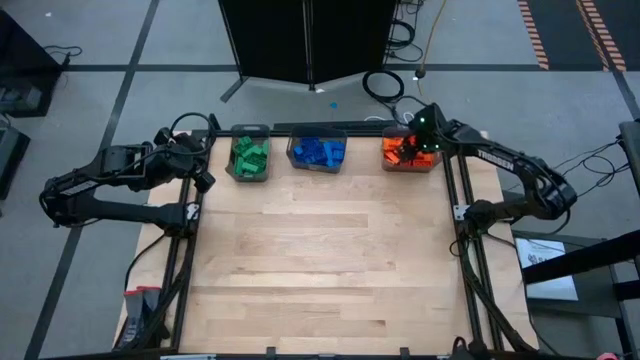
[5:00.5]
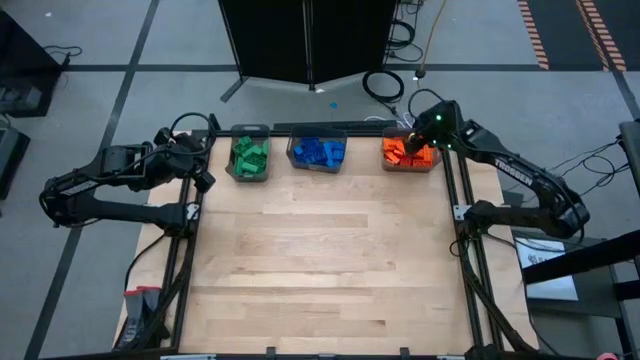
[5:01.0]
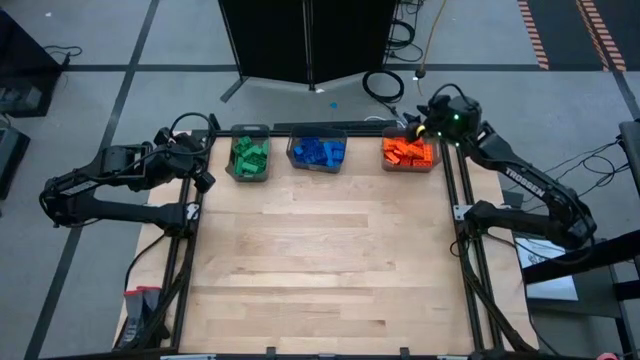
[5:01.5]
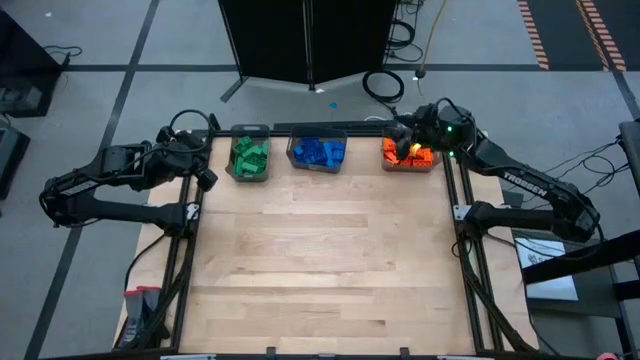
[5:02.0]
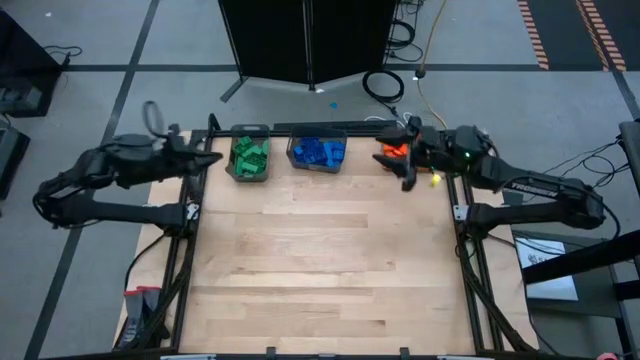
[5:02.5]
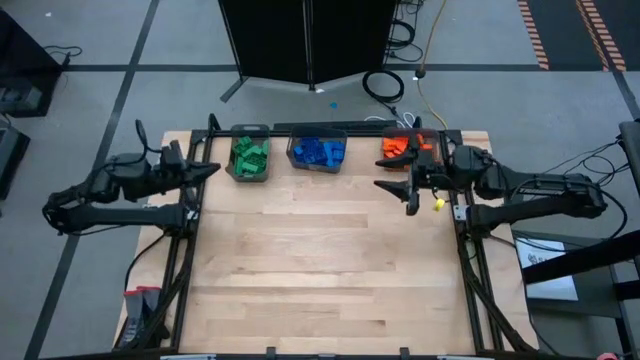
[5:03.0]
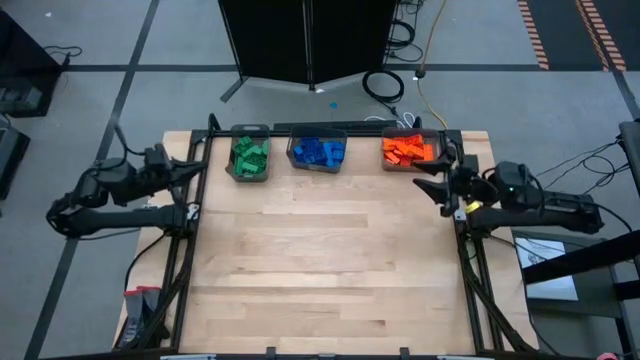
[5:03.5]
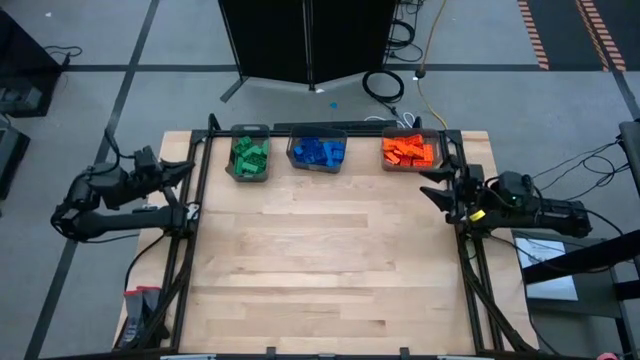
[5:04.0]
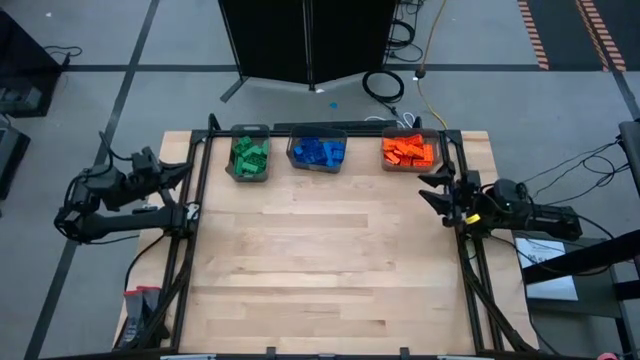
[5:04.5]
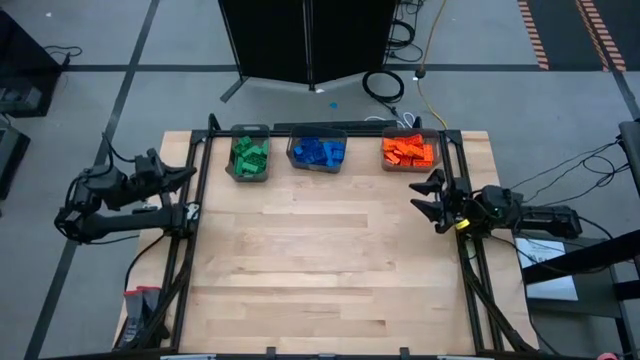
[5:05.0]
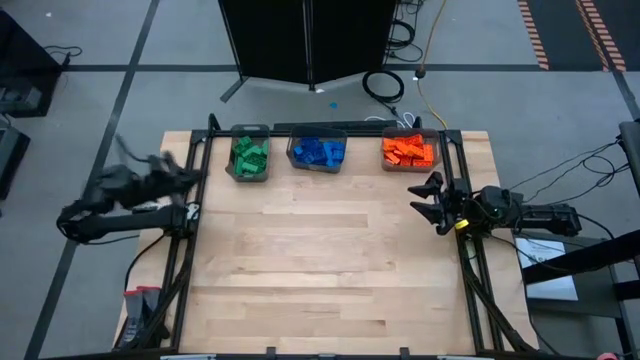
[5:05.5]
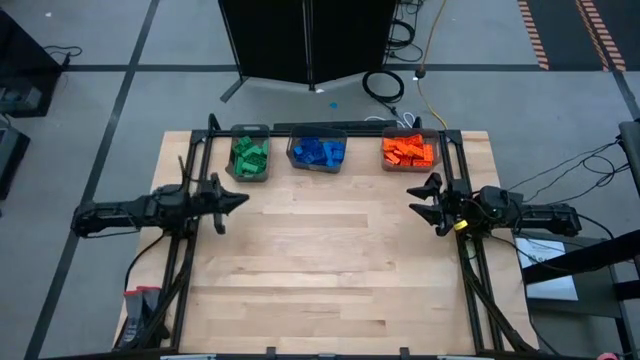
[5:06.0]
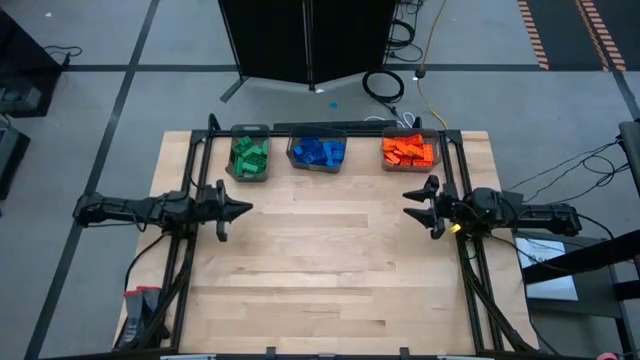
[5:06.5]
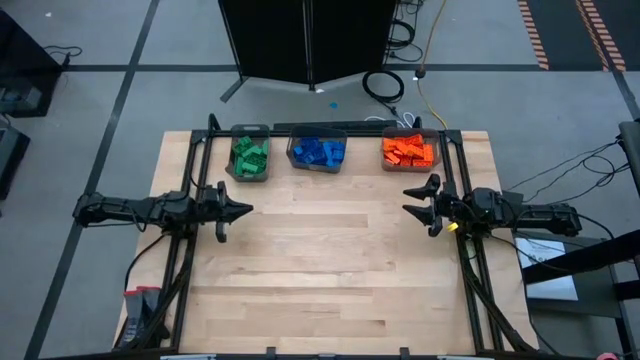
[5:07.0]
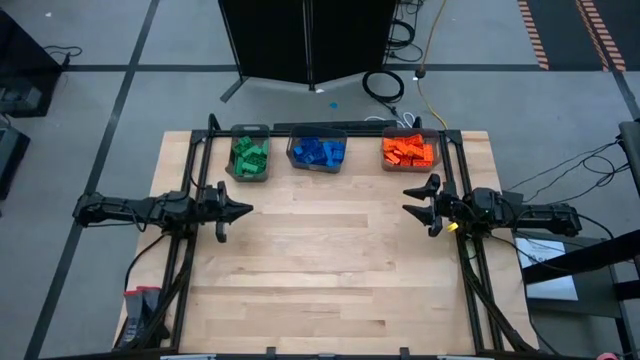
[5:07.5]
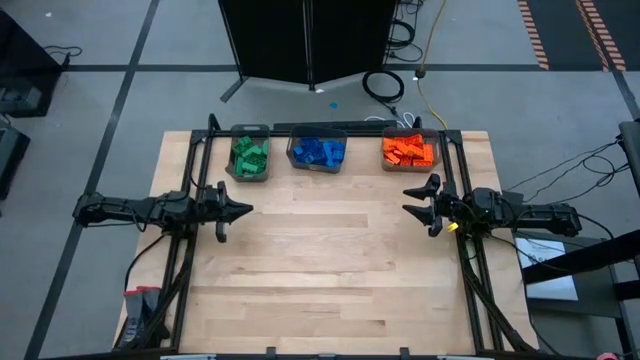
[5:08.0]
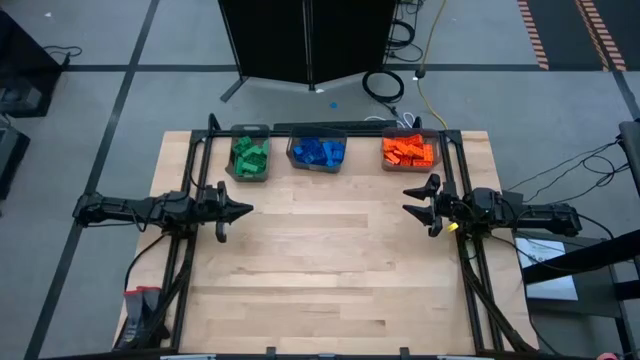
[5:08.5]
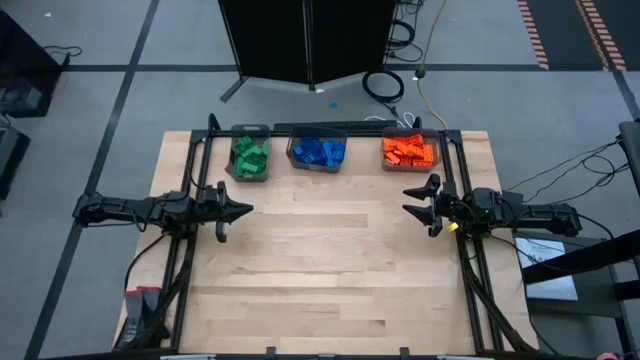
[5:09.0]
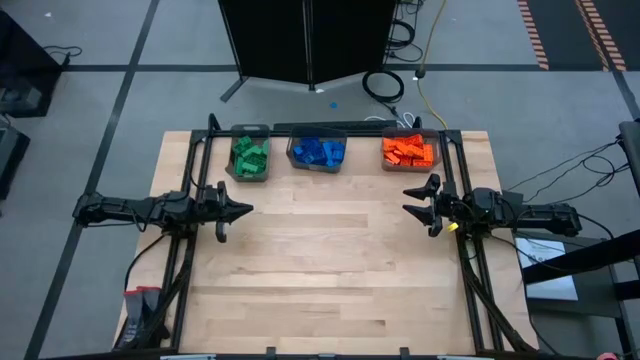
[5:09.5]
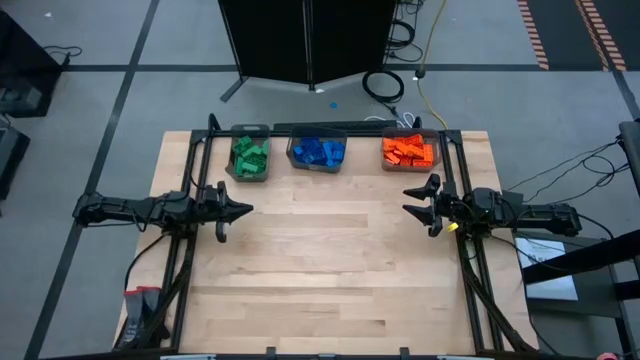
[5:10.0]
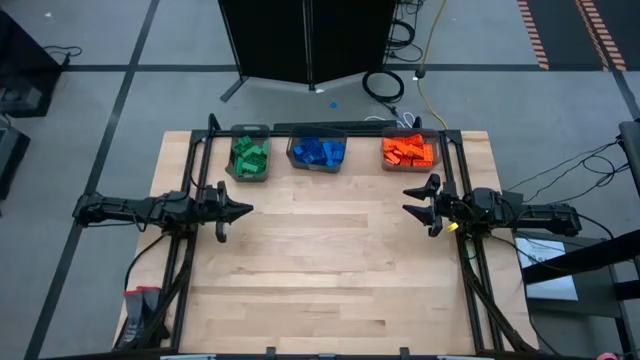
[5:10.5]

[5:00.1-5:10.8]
Task: Sort blocks
Return to Home Position

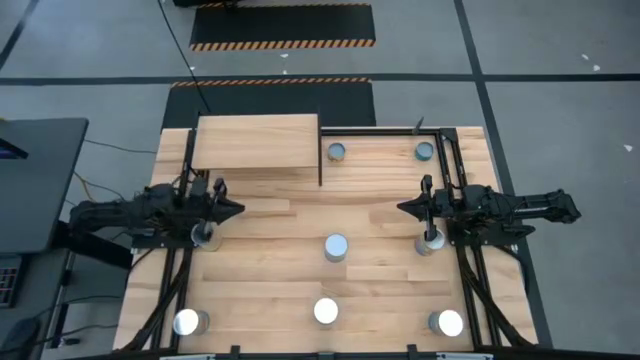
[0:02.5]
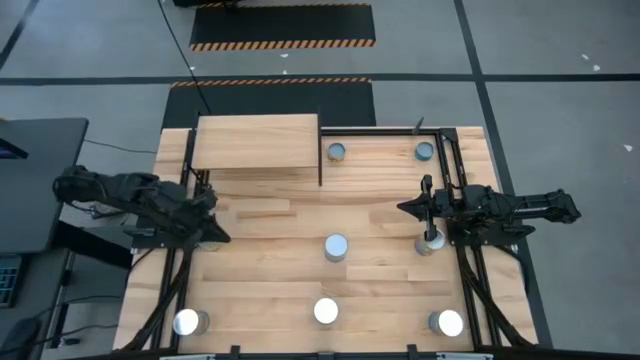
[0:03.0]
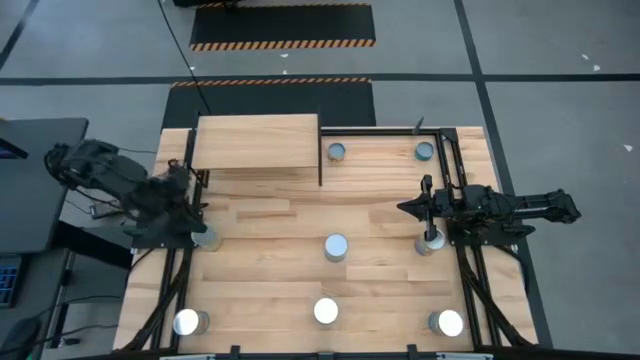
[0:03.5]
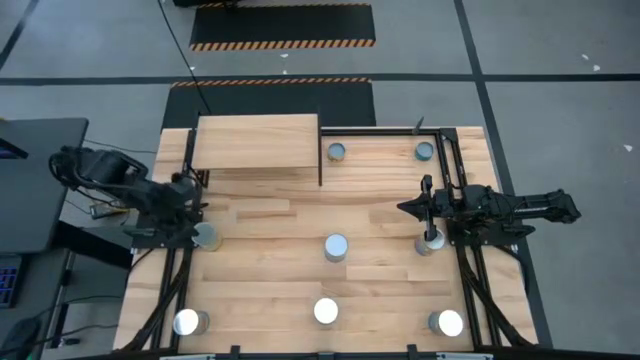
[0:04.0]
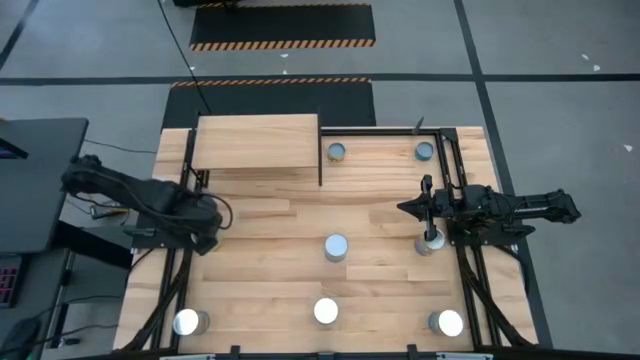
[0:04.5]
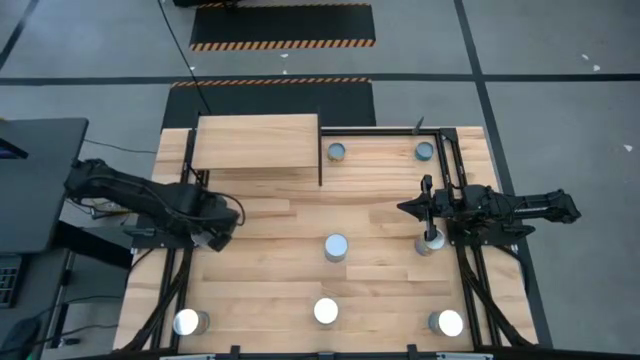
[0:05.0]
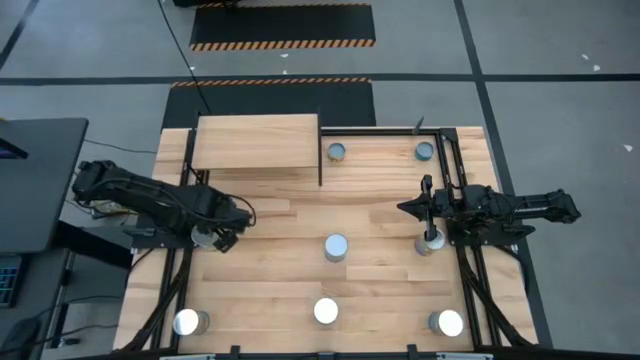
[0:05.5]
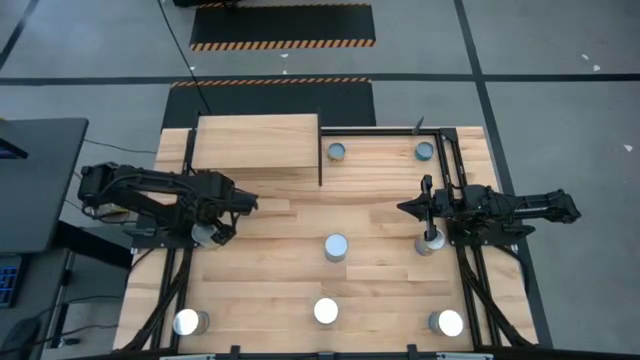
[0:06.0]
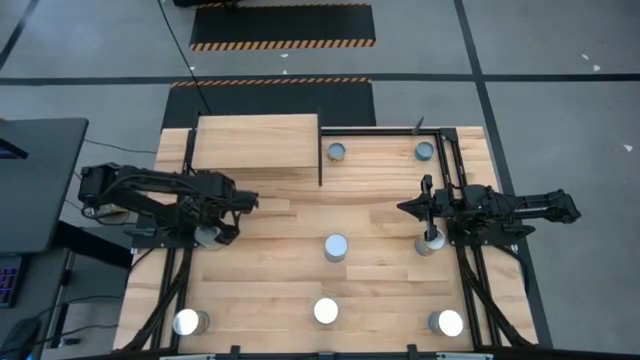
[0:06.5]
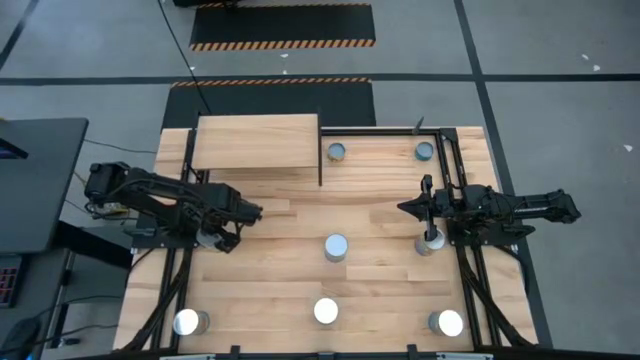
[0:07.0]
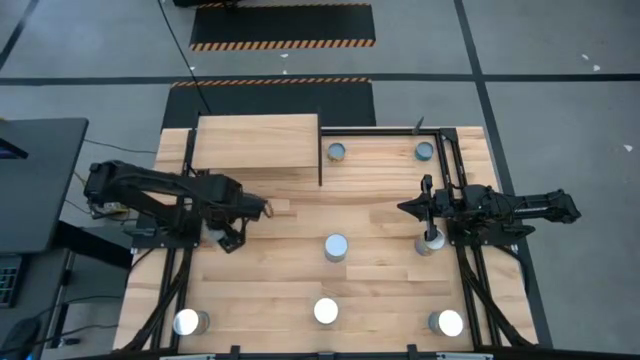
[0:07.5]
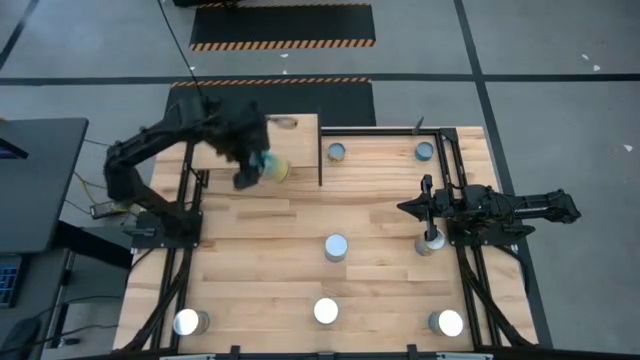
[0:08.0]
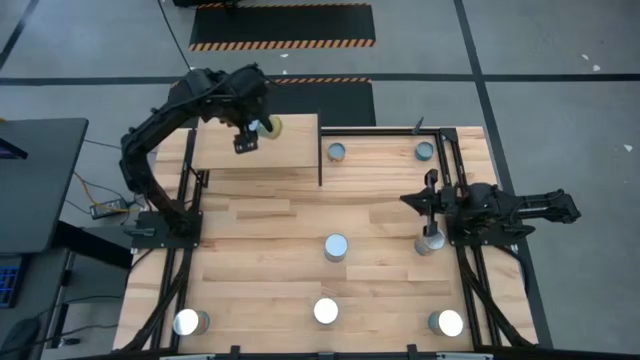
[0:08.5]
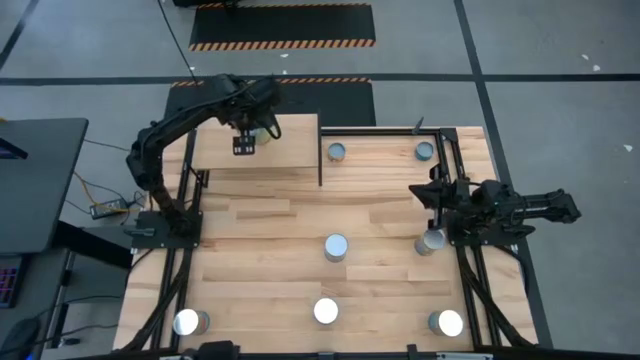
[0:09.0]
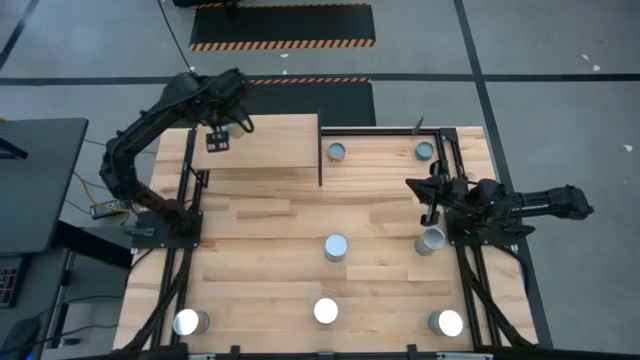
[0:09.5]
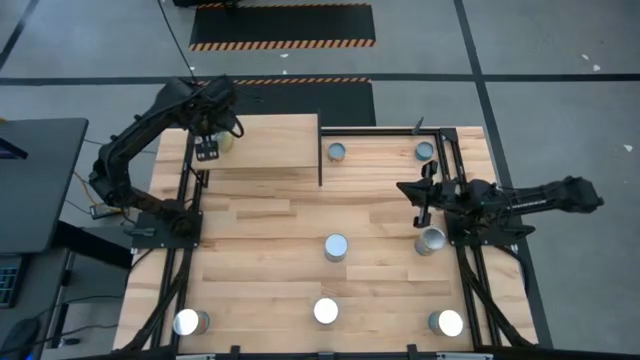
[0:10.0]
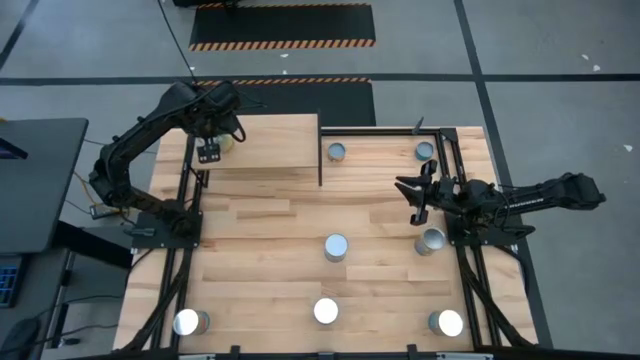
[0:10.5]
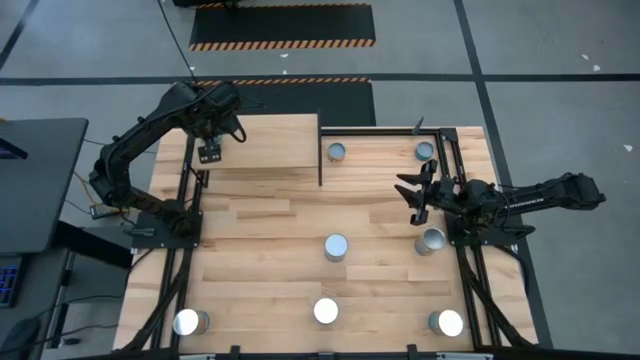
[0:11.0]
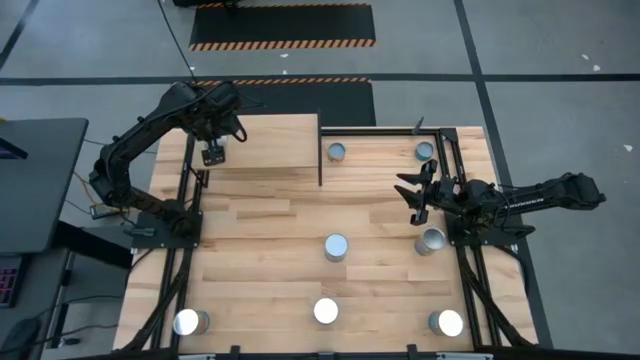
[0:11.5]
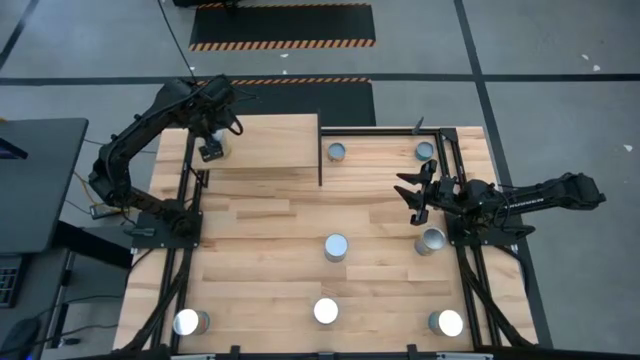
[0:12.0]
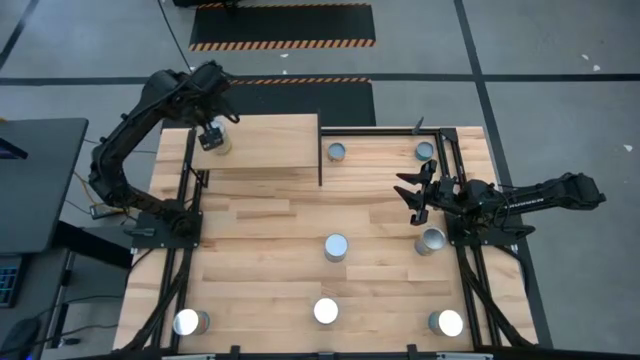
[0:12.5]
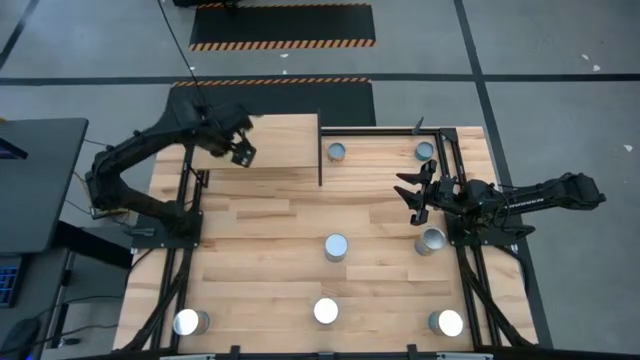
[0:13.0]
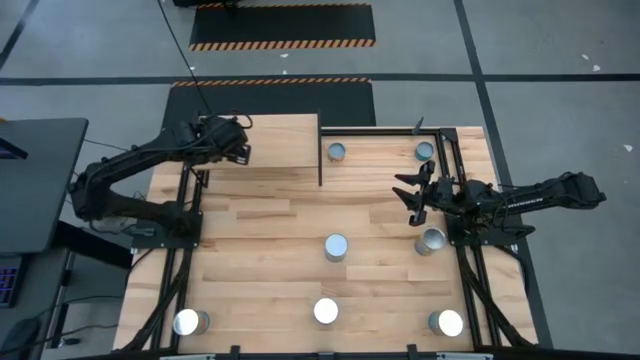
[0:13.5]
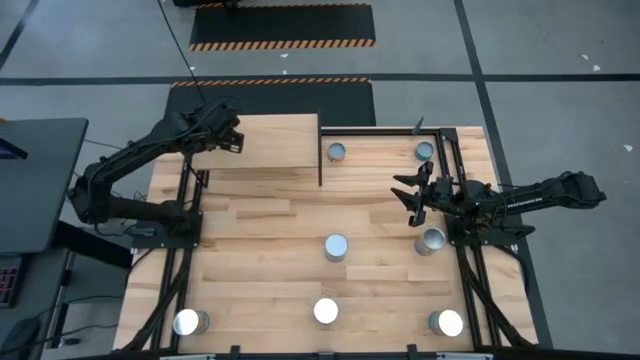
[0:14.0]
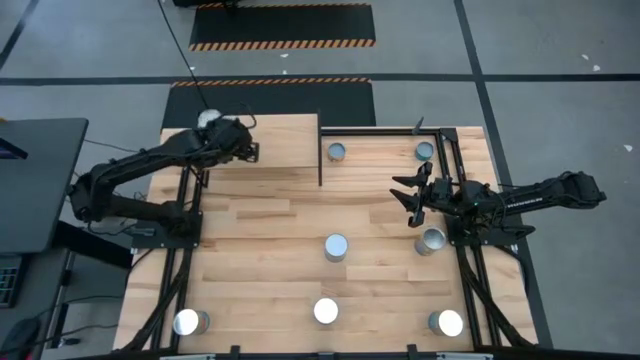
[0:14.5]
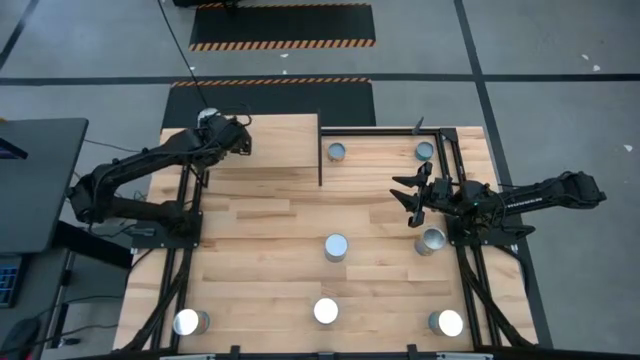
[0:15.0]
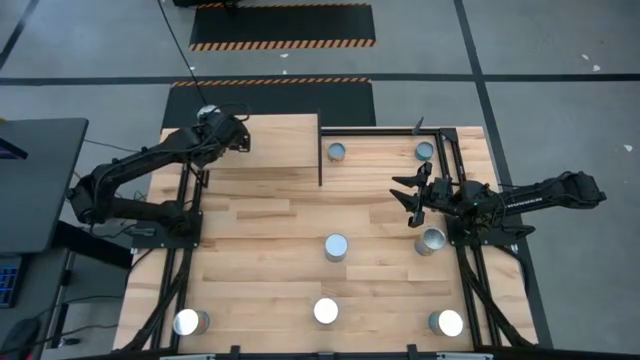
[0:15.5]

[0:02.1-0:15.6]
Task: Pick and place cans onto a shelf
Put the canned carrot on the shelf
